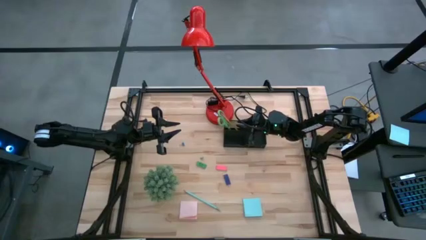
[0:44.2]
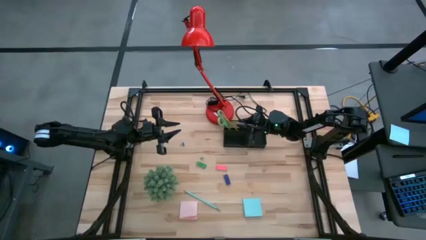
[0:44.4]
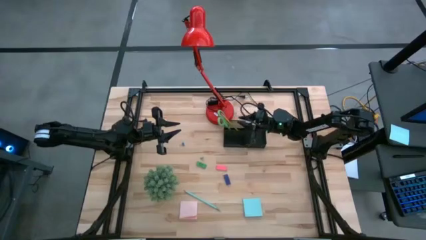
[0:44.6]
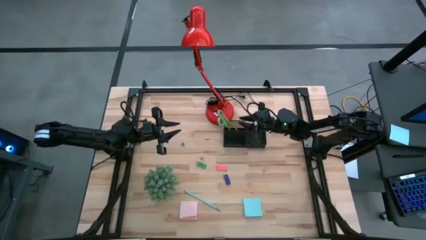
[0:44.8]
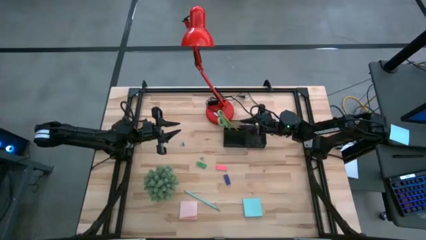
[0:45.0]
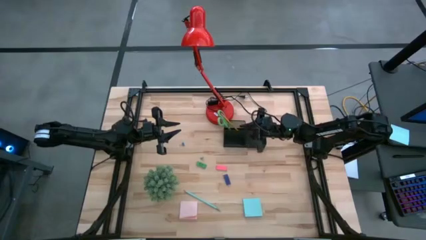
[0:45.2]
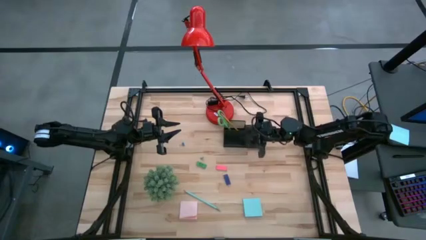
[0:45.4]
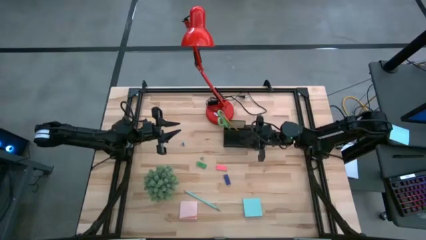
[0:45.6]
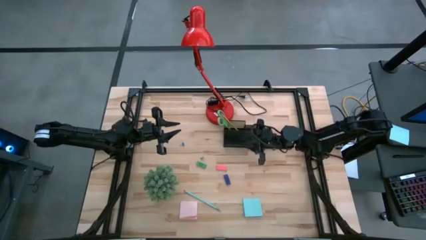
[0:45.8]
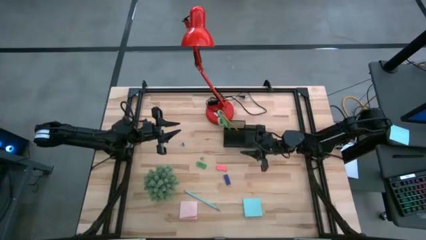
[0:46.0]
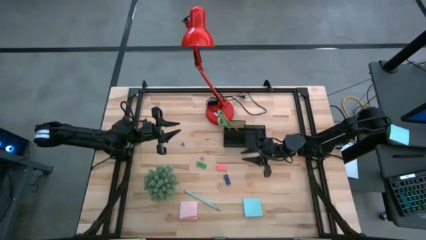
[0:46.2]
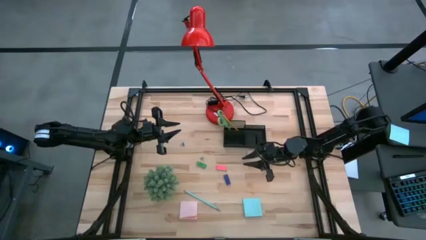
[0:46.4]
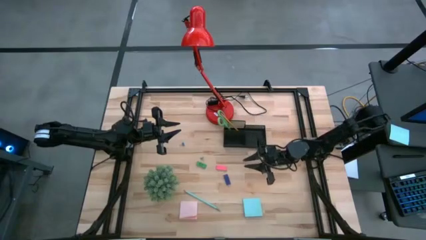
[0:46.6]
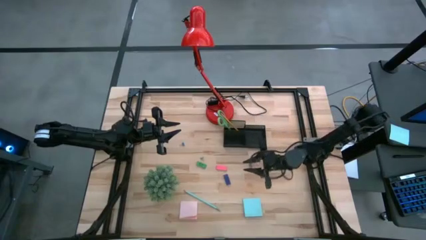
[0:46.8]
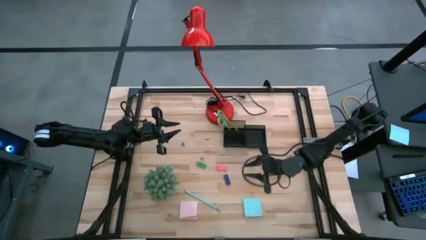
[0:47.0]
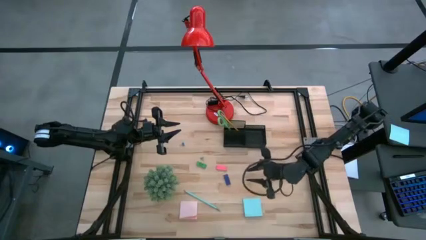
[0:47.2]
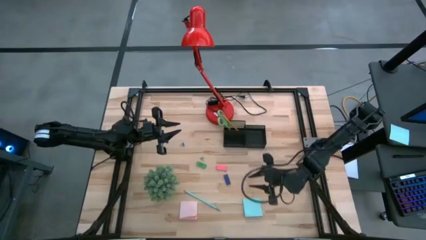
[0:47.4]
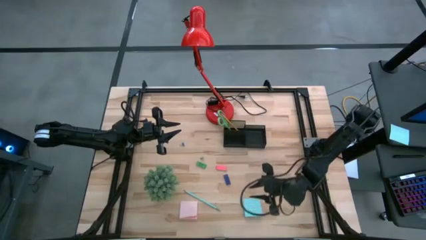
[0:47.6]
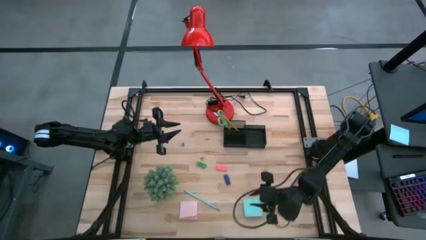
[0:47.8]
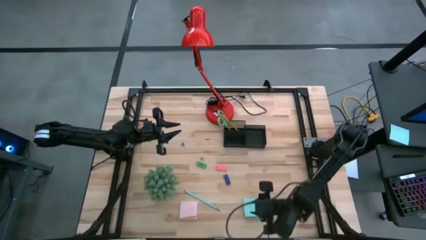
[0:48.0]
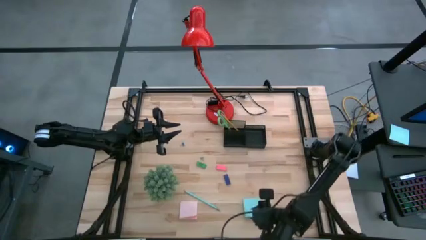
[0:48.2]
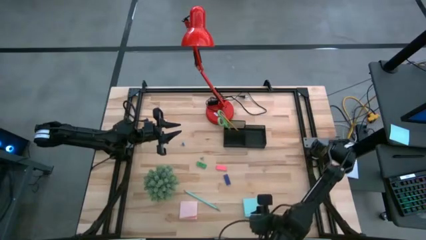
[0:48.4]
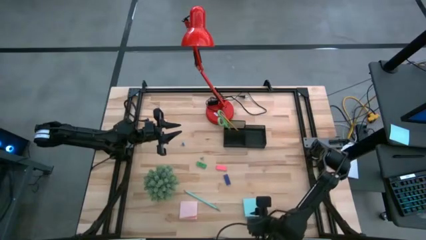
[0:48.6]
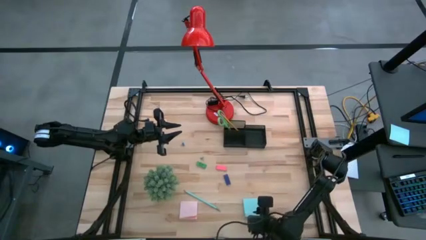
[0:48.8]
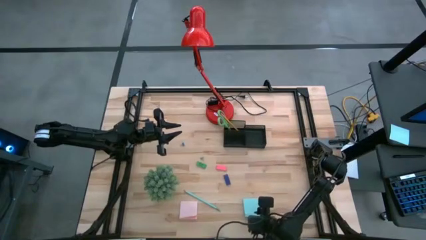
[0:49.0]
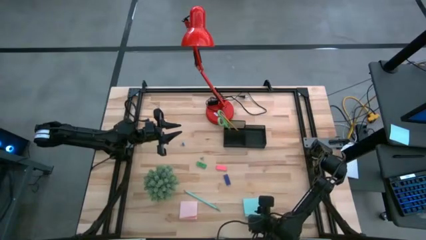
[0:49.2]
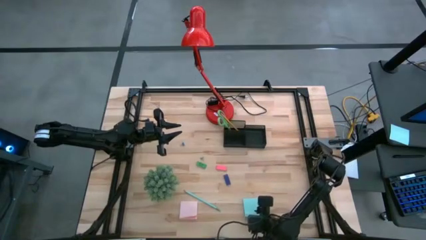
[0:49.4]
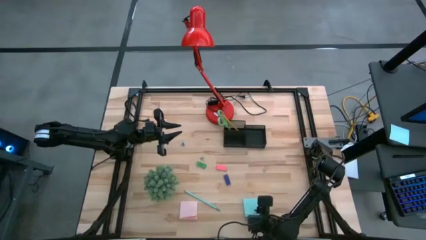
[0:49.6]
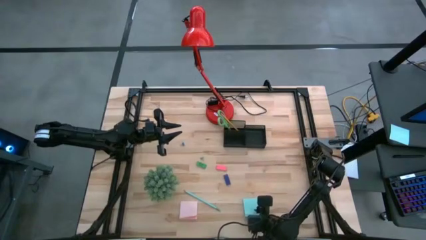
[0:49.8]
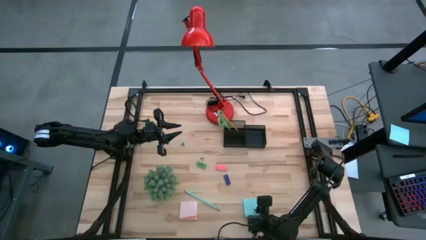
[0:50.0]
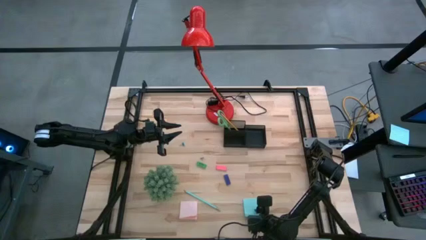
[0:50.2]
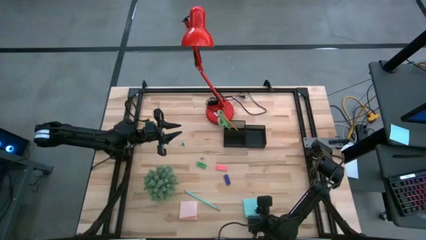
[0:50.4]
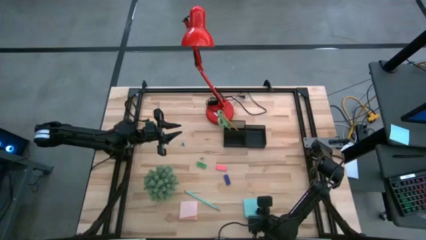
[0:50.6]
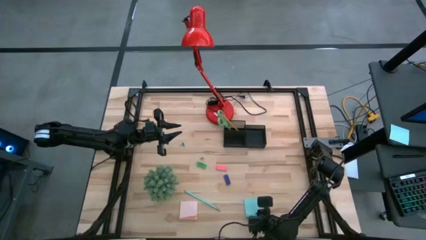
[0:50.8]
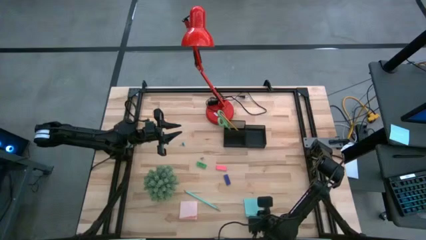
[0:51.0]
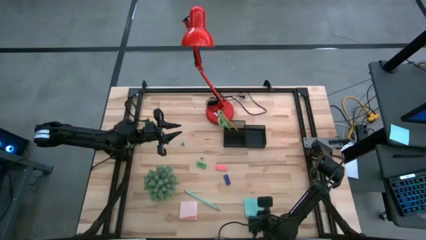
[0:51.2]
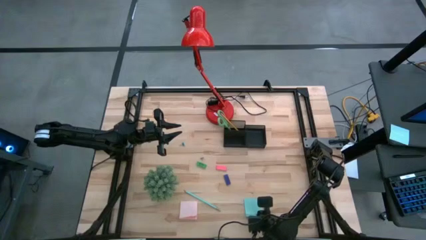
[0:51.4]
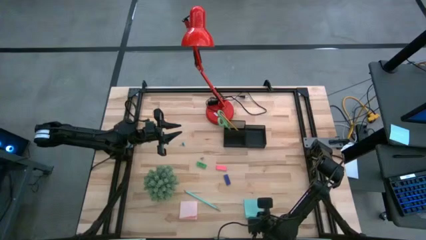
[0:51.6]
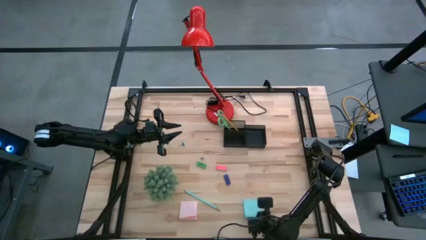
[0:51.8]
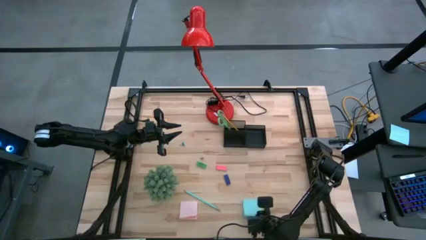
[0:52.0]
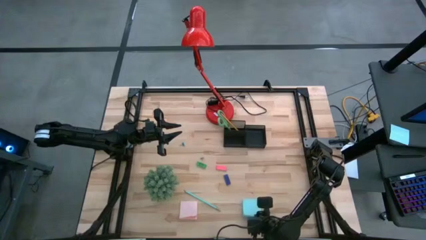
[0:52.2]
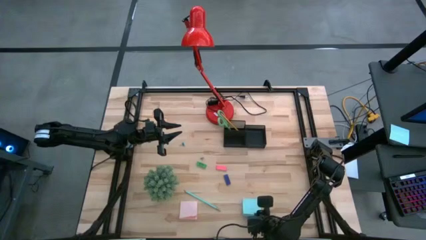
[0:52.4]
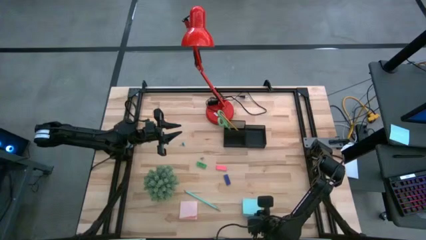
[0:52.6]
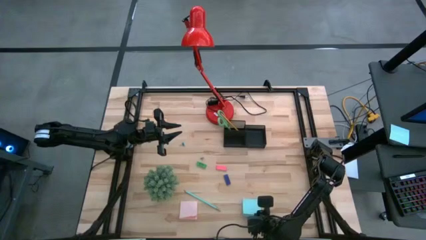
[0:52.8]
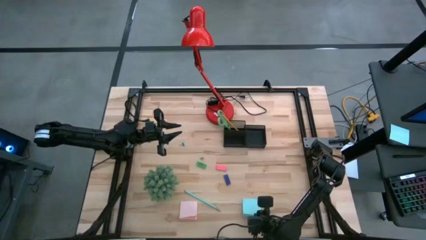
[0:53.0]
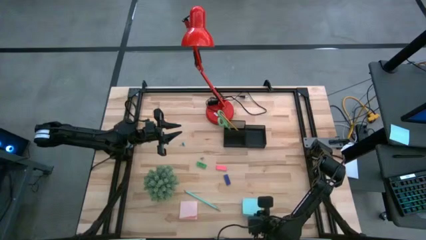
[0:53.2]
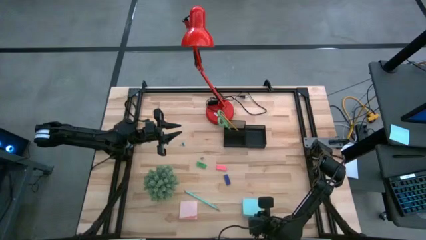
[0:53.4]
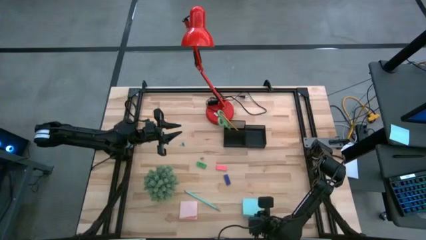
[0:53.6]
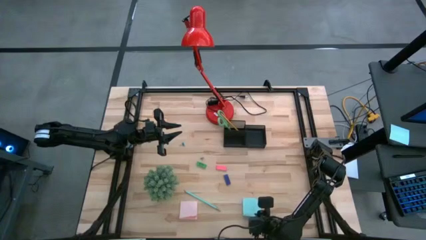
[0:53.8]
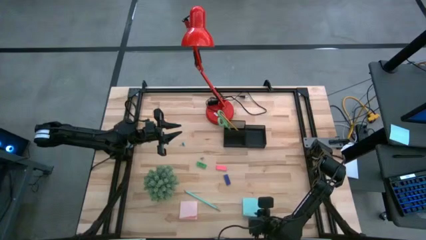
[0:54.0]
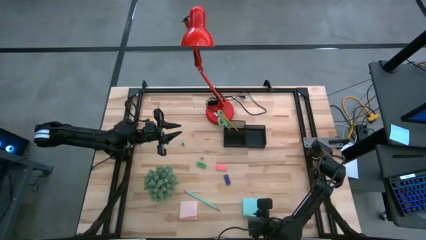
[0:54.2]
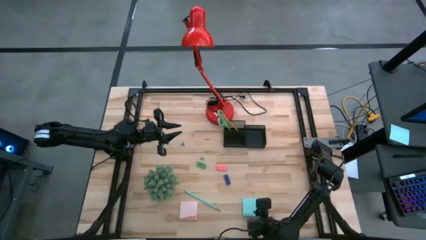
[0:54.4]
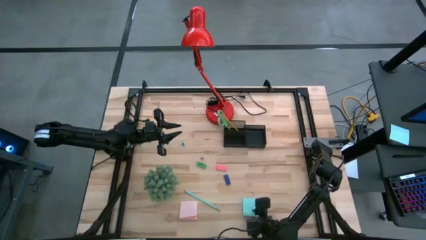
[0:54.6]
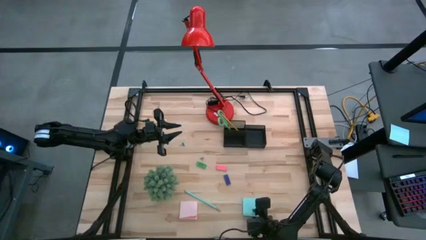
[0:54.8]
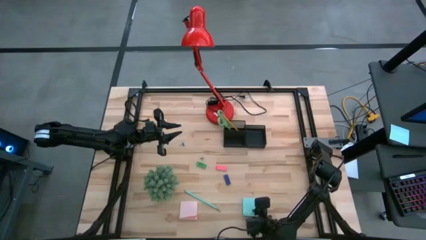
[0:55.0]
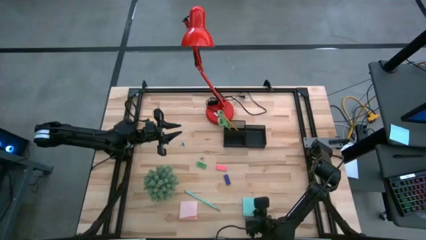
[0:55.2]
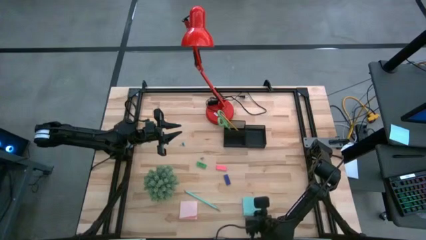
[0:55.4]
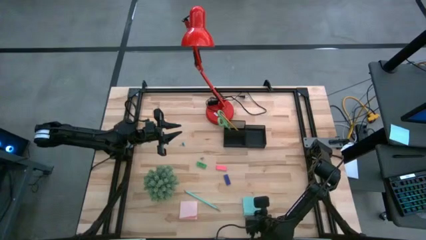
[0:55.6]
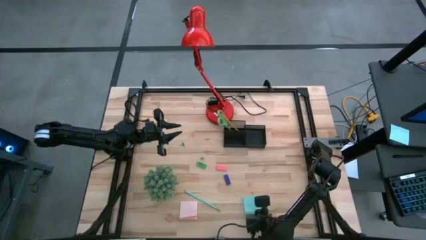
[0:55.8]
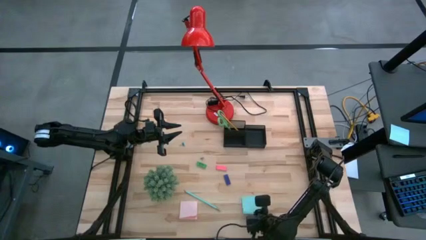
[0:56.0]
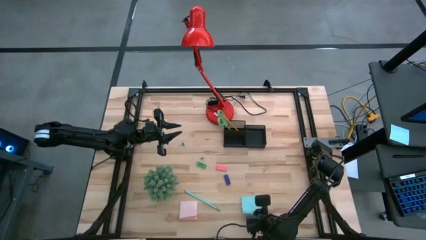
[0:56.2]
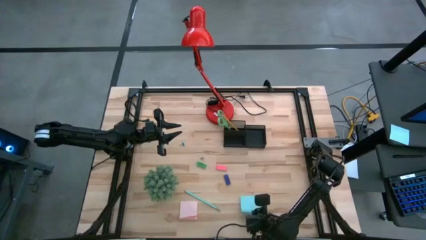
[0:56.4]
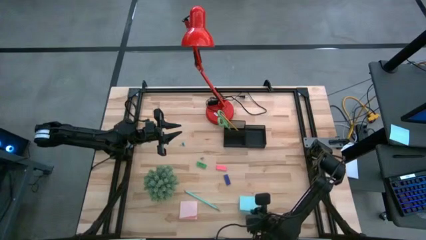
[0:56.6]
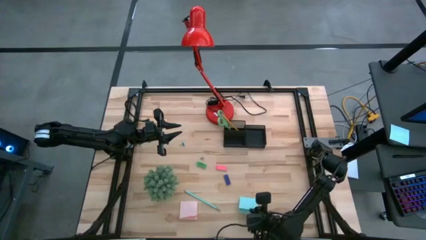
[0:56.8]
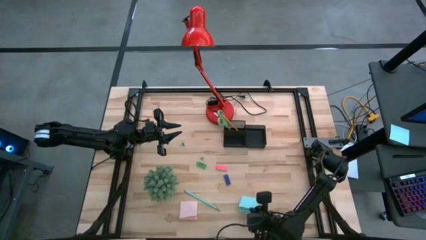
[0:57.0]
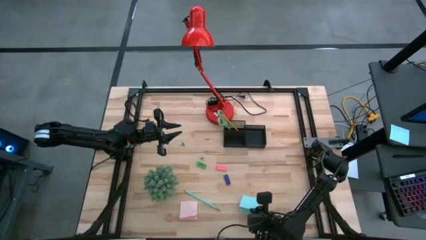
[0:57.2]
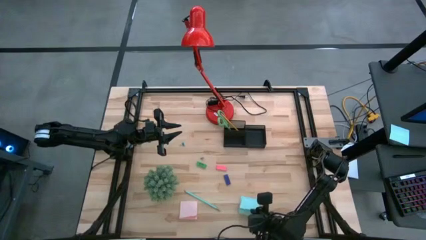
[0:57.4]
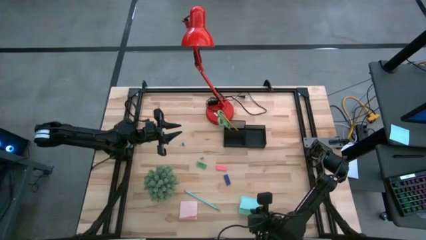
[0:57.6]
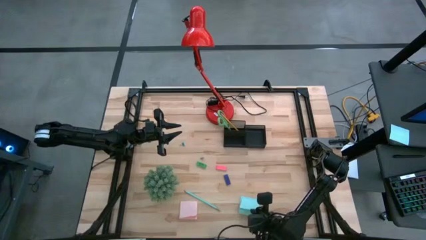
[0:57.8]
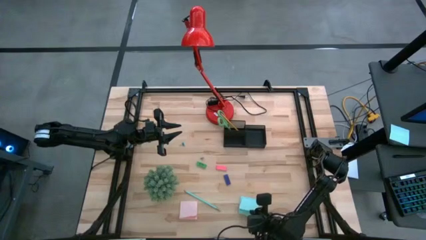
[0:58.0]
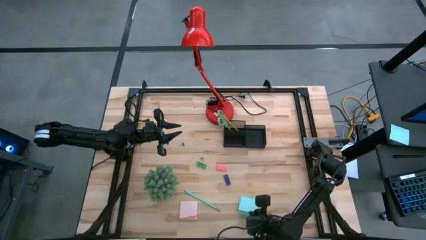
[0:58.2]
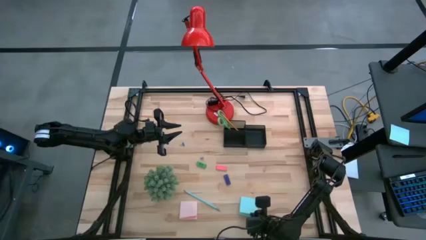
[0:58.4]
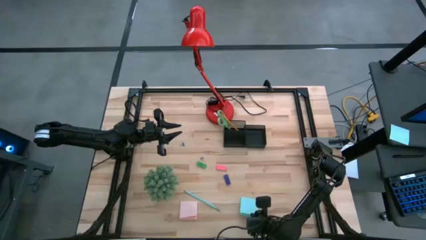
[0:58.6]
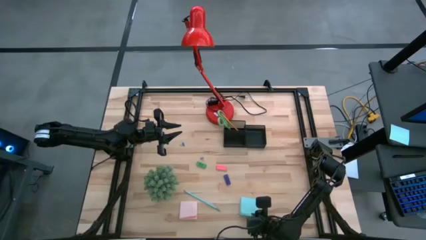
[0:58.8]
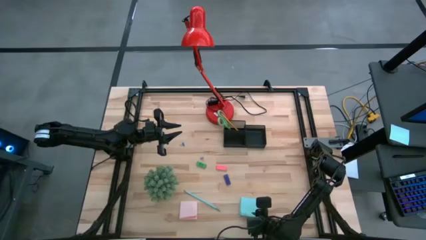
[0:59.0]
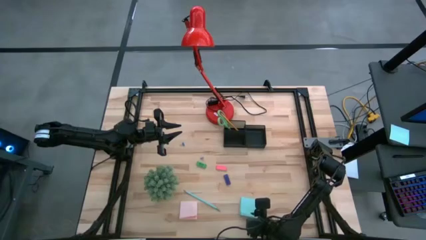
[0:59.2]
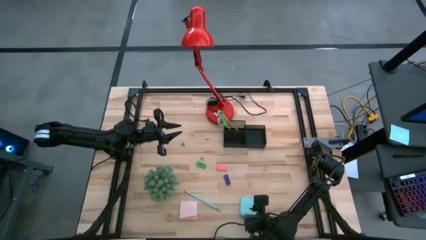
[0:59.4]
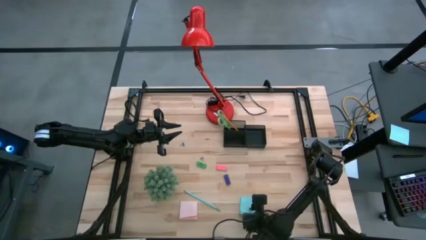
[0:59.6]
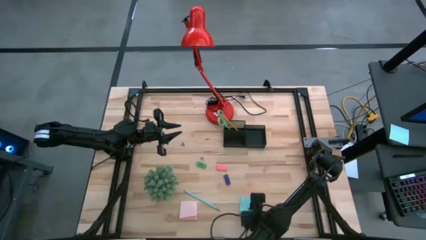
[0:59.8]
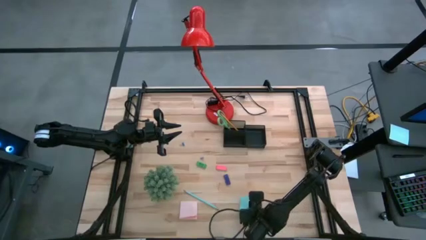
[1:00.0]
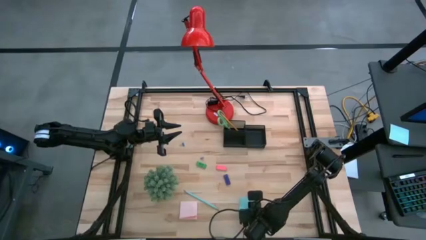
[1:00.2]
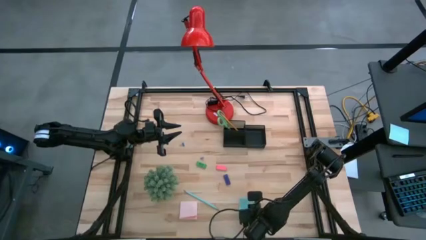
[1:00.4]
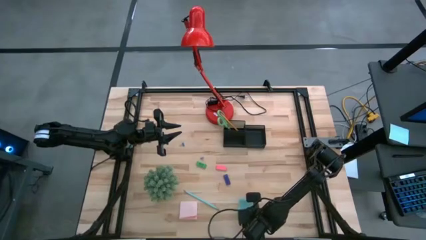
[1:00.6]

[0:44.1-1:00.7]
Task: Pick and place office supplies into organizer
Put the top blue sticky note into the right compartment of the desk organizer
